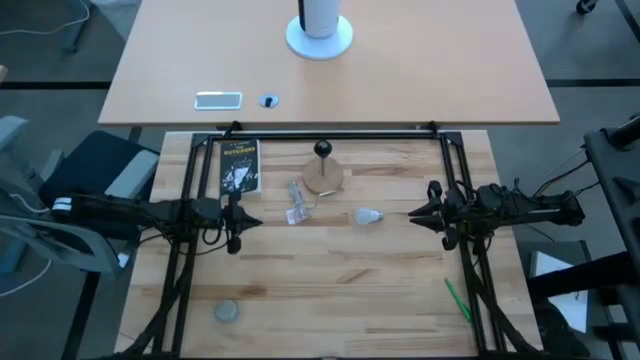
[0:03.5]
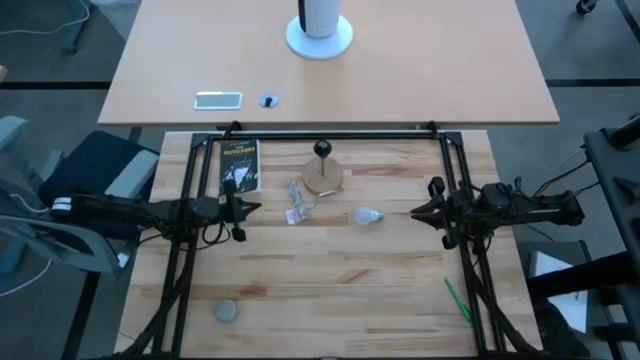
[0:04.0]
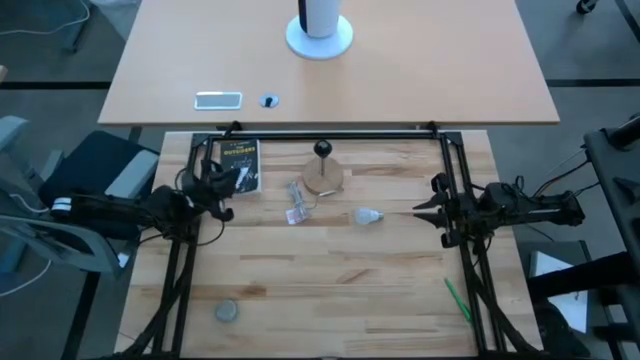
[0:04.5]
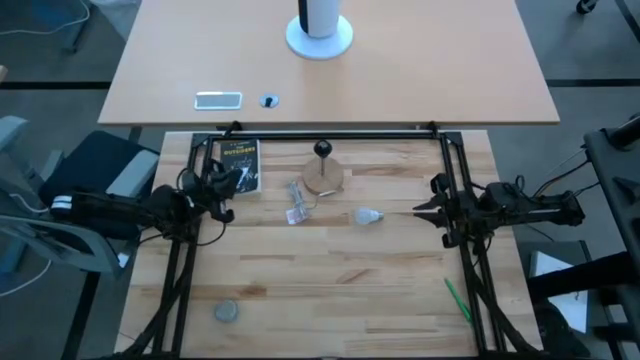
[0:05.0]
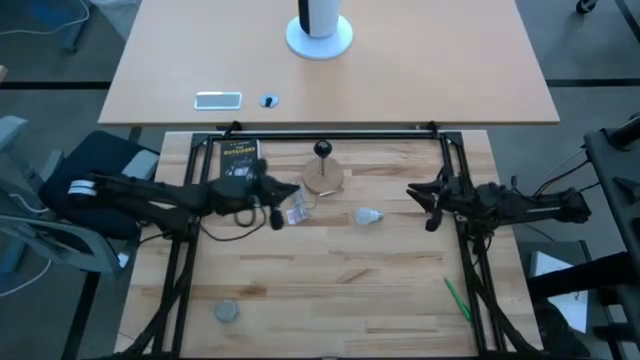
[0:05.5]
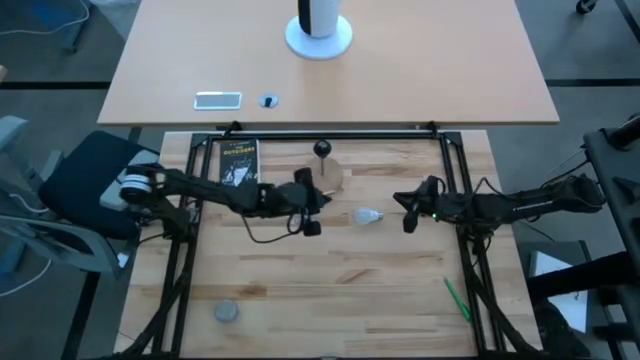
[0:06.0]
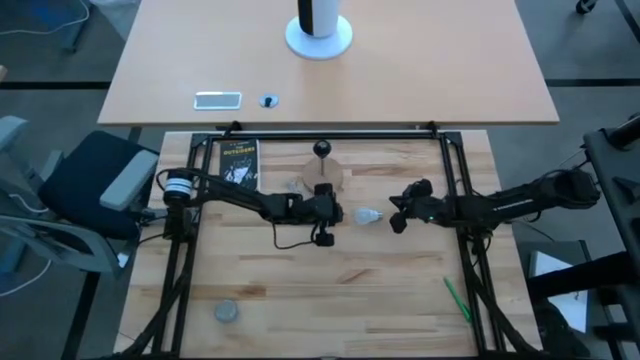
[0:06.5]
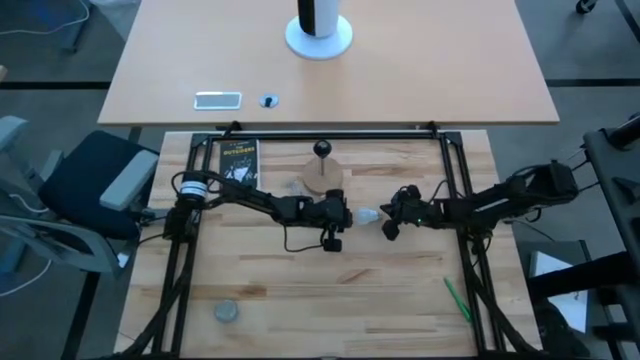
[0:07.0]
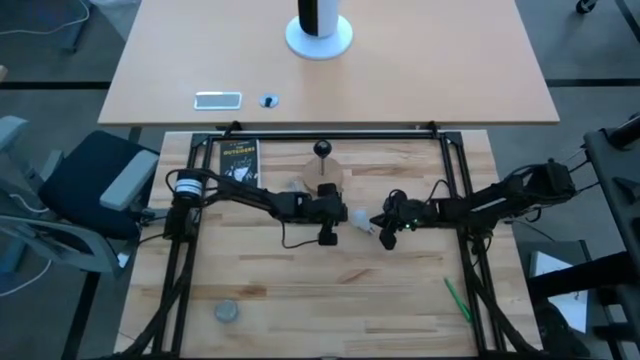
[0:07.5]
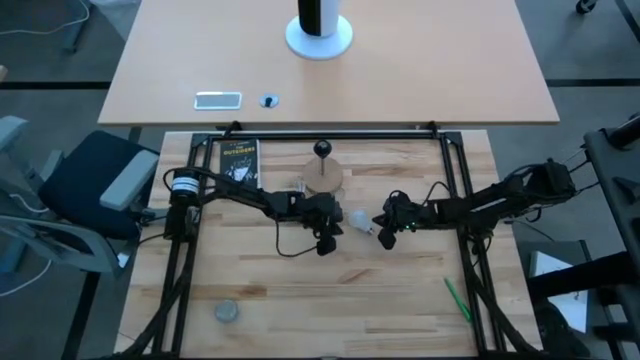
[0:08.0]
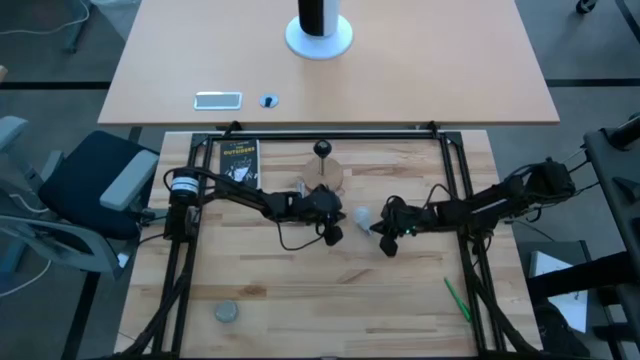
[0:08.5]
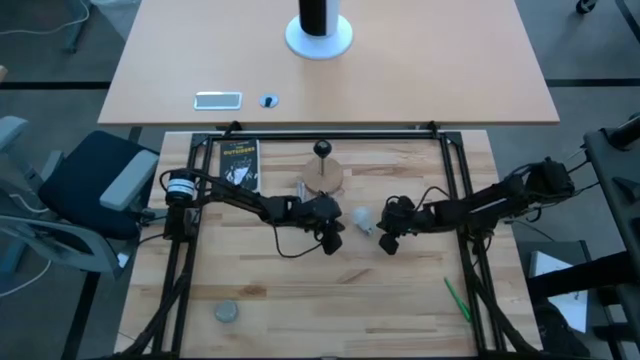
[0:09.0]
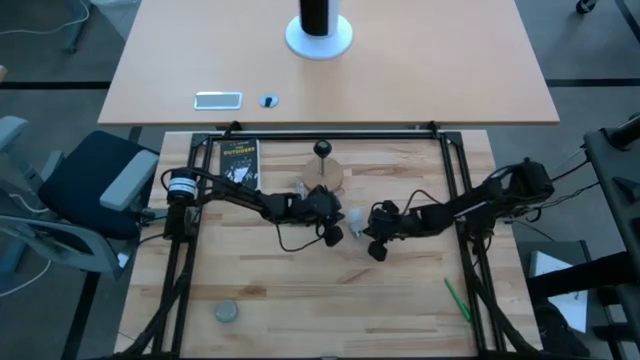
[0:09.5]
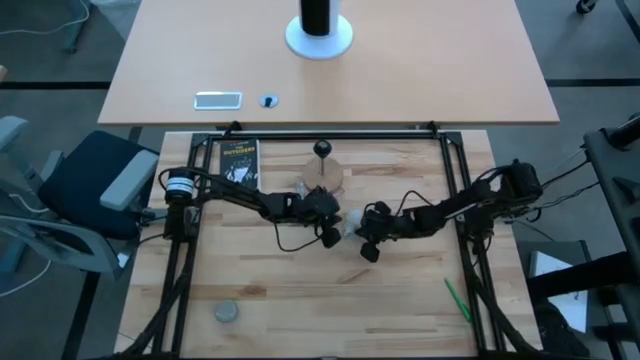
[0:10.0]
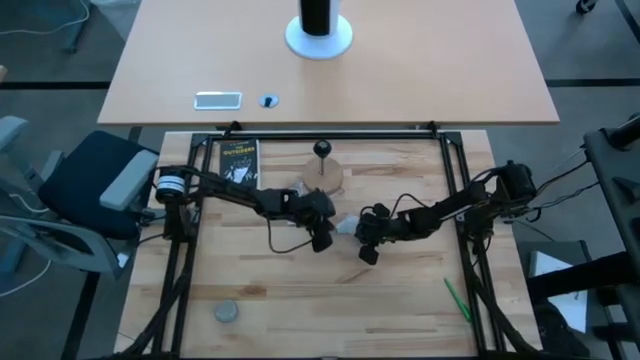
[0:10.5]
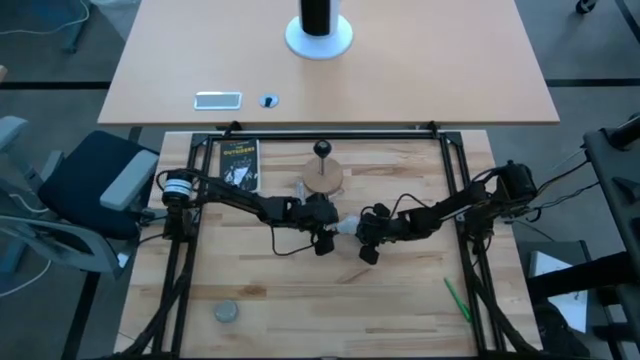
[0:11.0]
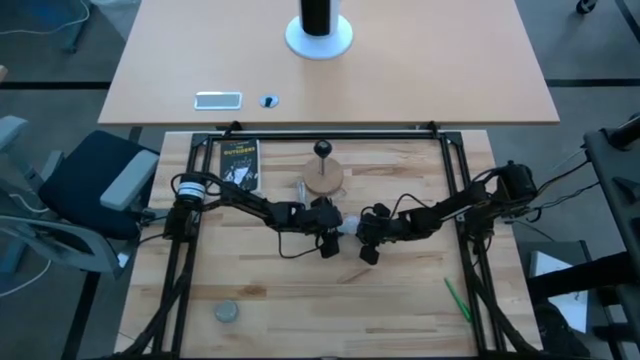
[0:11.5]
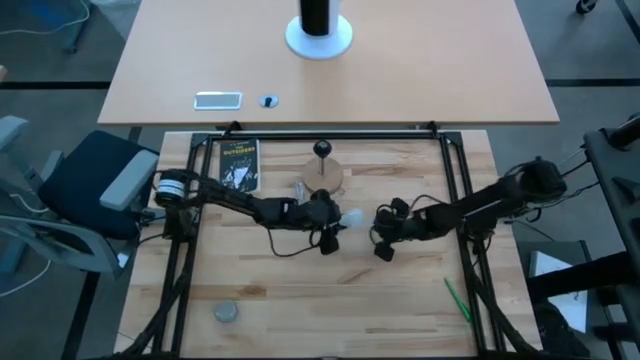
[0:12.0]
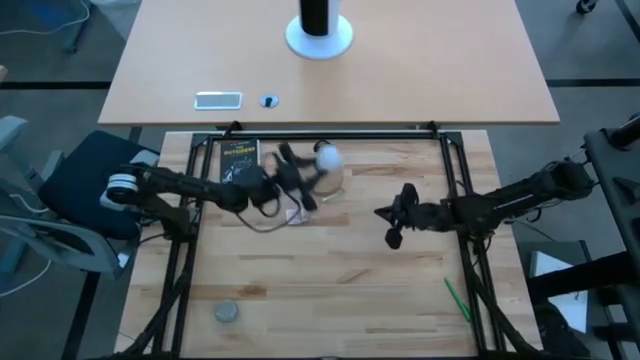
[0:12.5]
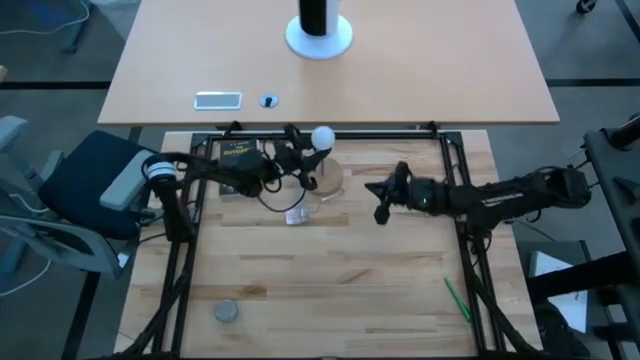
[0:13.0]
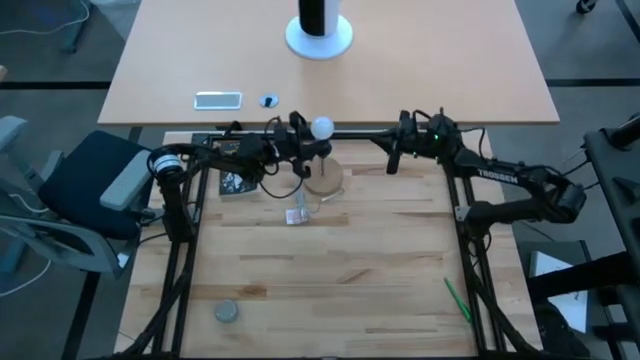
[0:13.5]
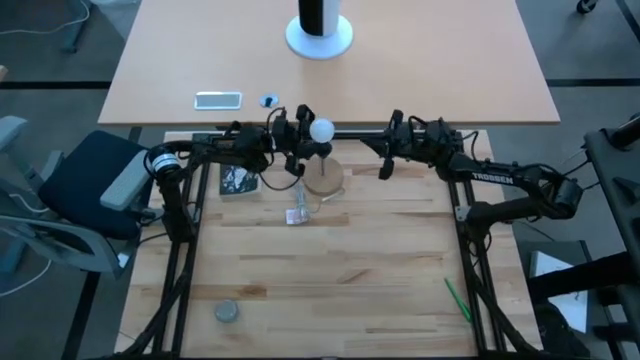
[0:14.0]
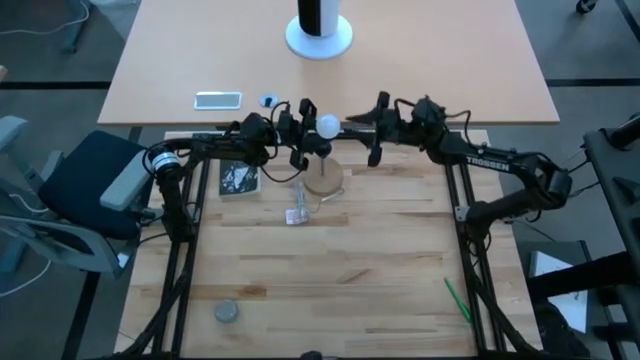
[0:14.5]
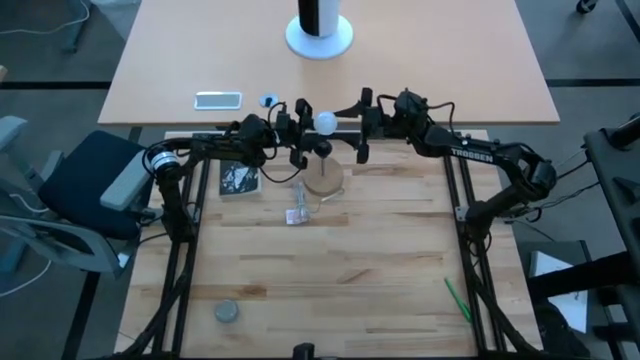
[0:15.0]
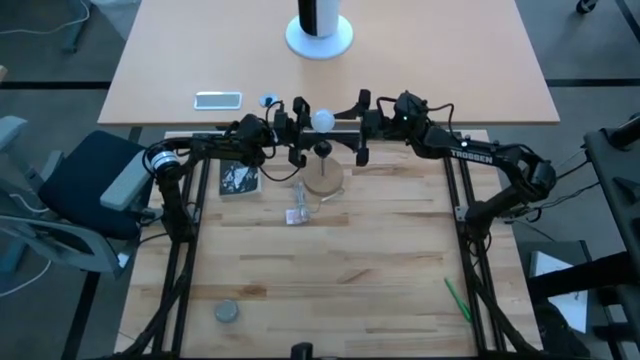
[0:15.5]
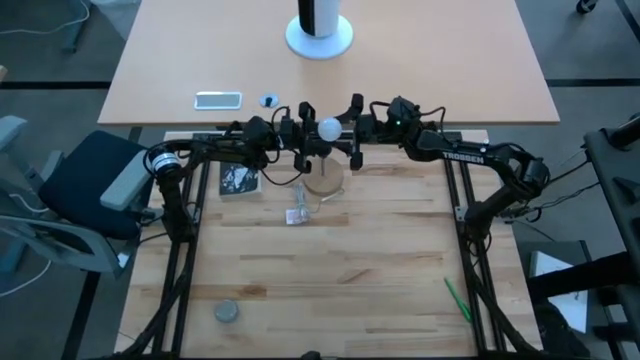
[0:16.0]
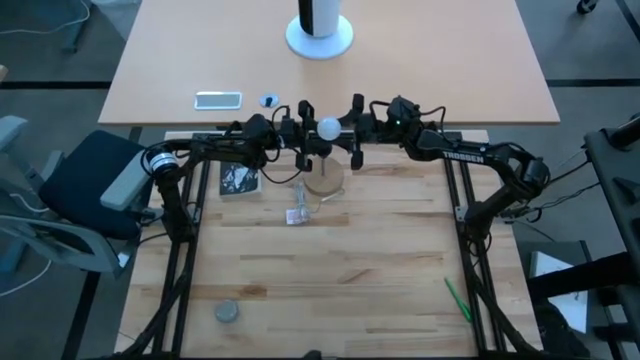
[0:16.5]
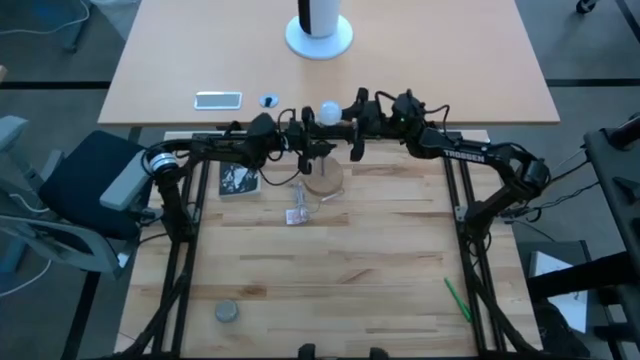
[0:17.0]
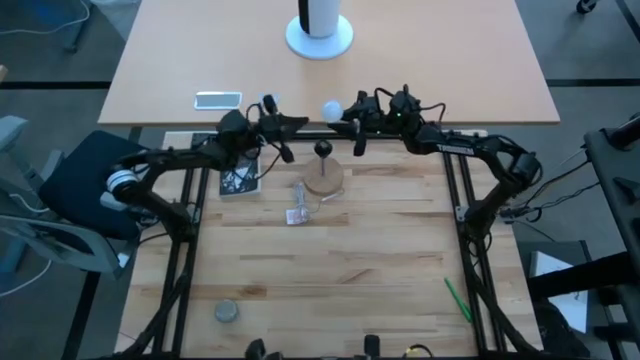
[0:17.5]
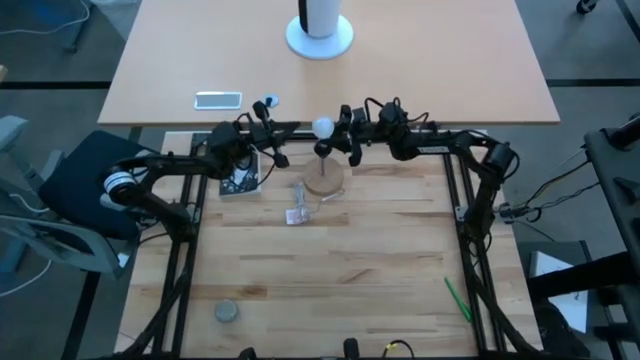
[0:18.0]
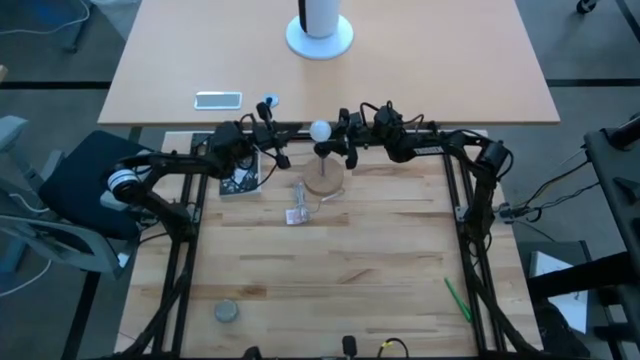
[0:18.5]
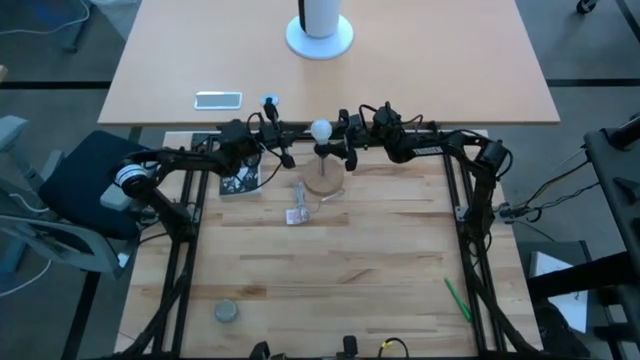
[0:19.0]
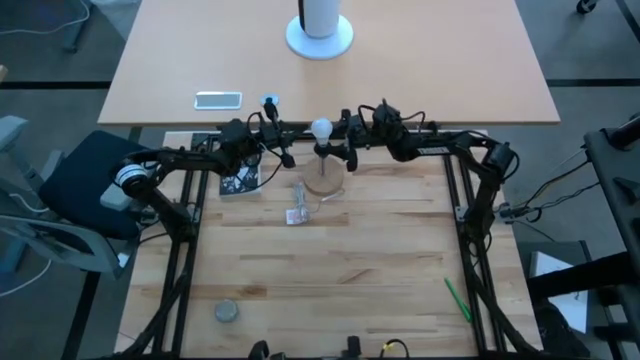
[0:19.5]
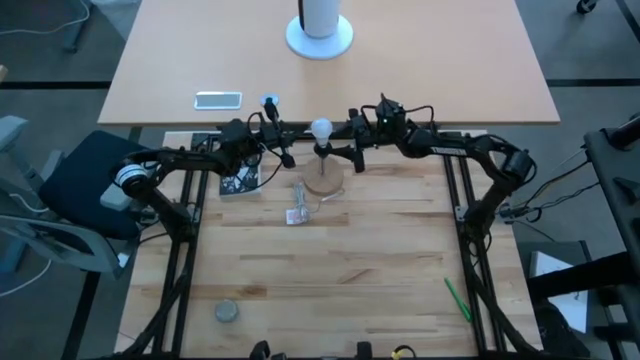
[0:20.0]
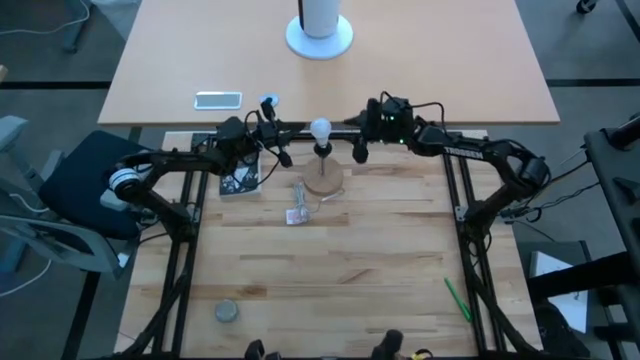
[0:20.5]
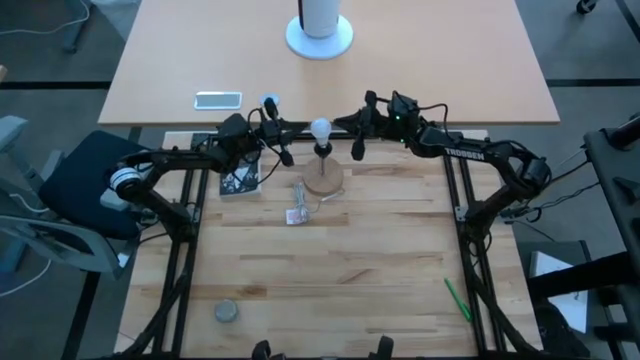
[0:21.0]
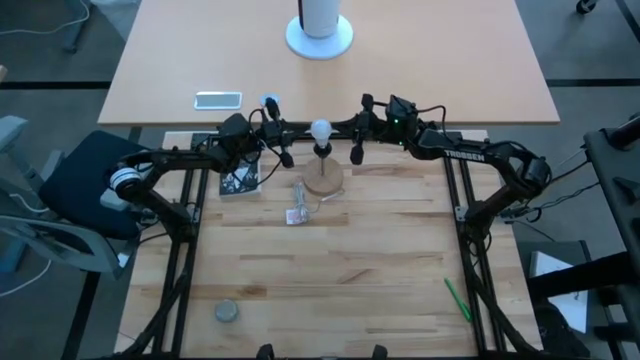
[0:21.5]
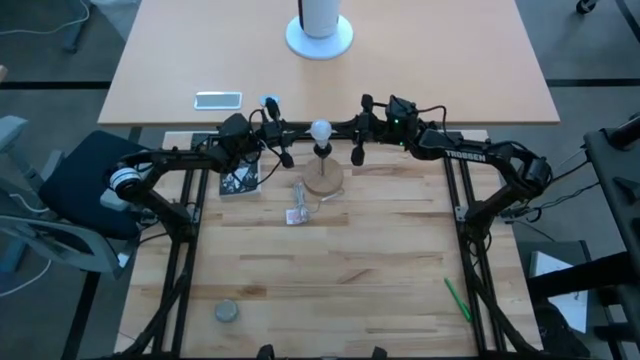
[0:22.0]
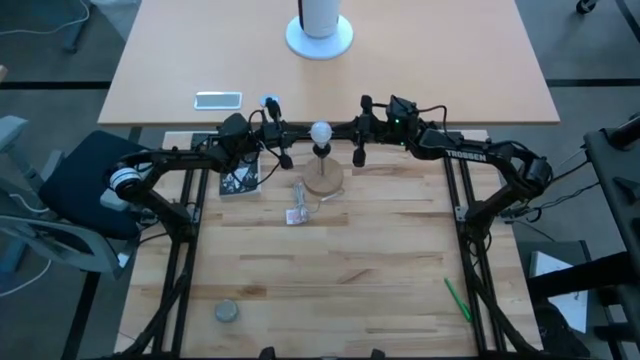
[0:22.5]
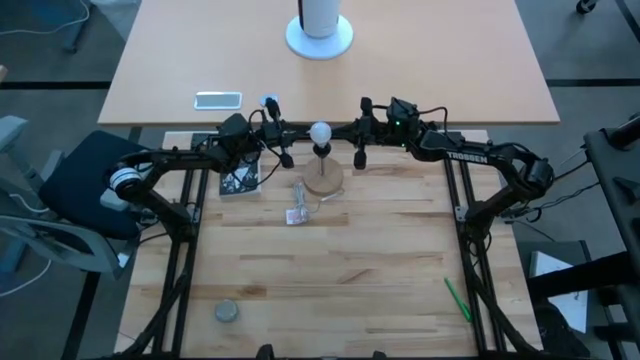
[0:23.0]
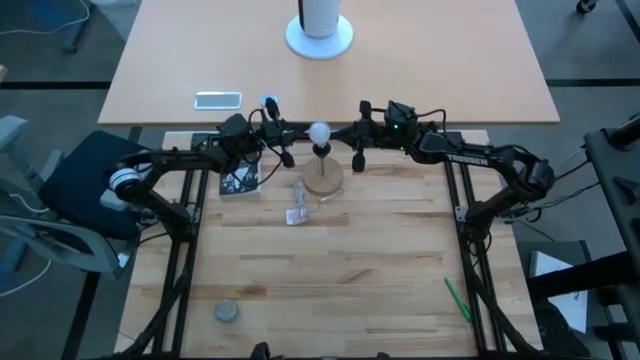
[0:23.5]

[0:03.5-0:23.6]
Task: Screw lightbulb
Insert the lightbulb into the black lamp
